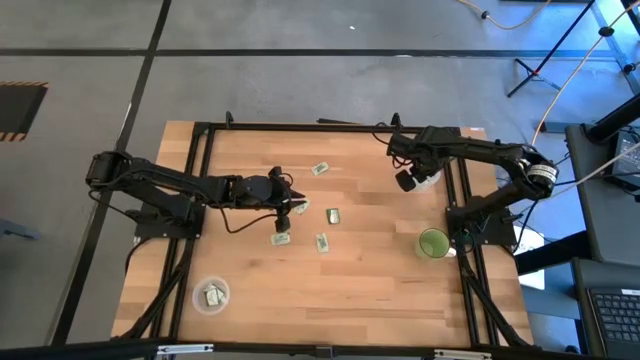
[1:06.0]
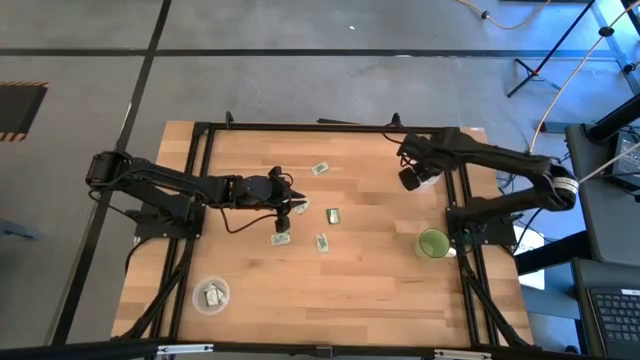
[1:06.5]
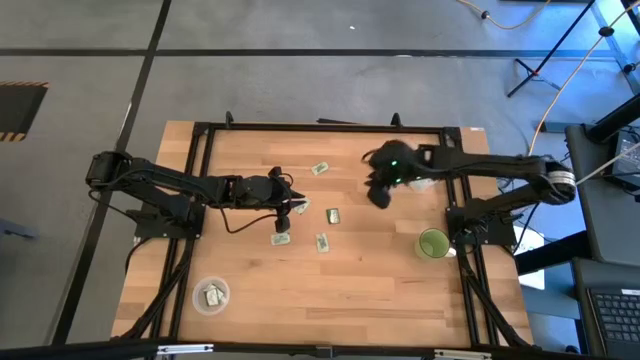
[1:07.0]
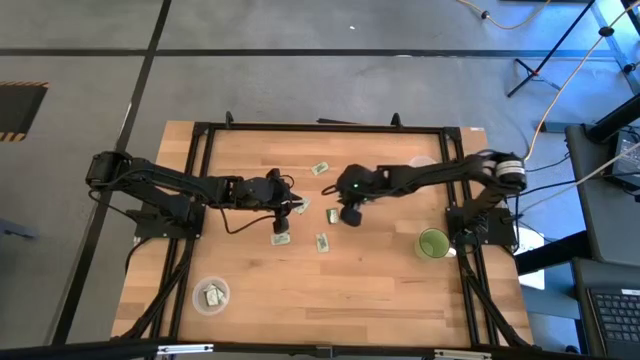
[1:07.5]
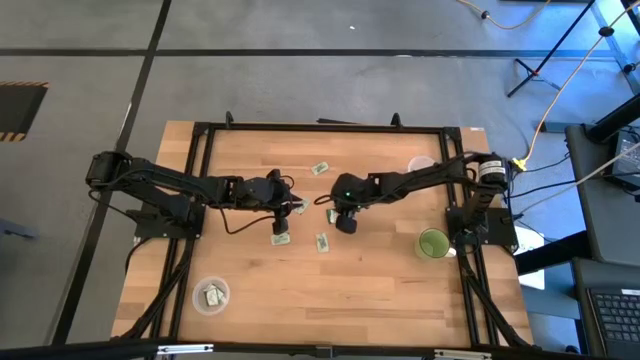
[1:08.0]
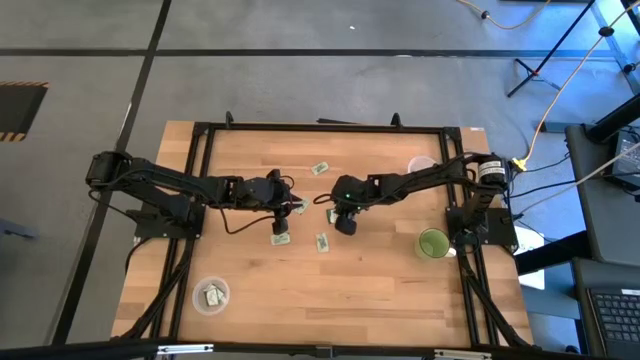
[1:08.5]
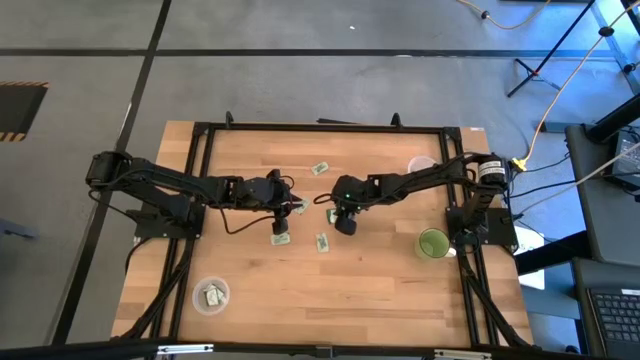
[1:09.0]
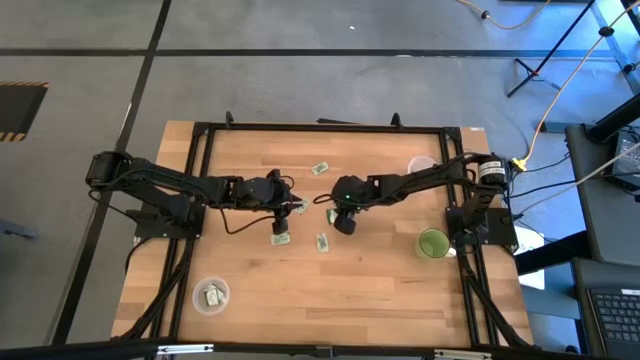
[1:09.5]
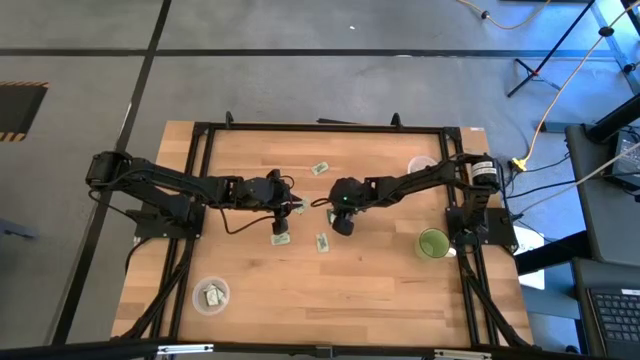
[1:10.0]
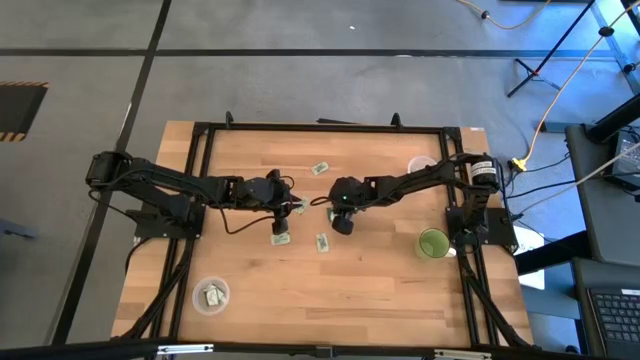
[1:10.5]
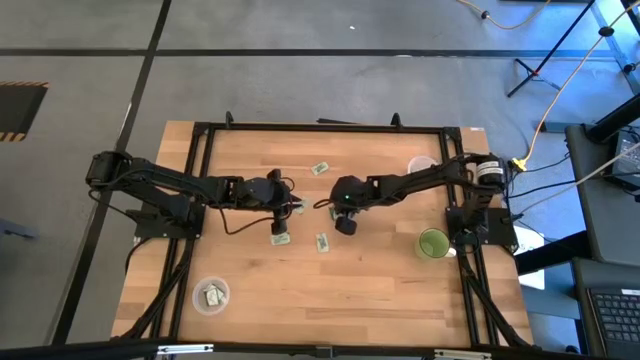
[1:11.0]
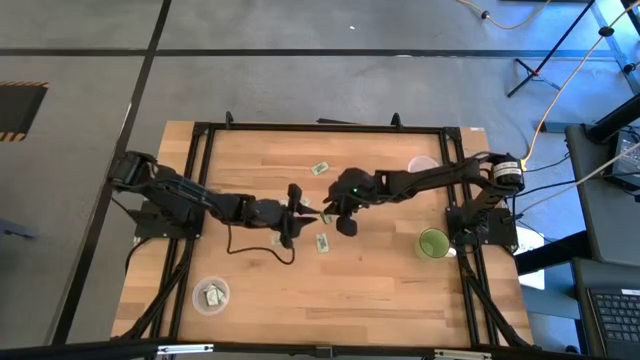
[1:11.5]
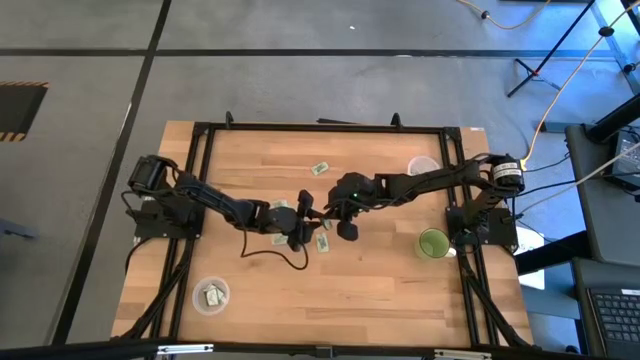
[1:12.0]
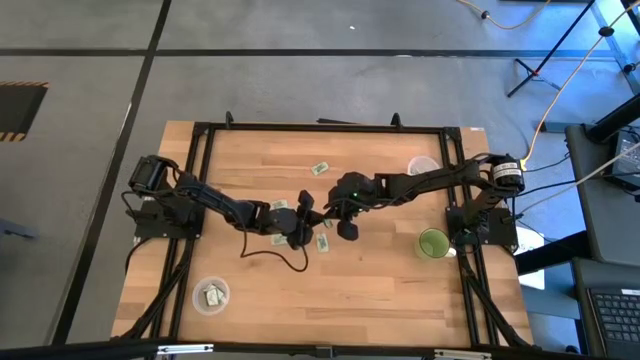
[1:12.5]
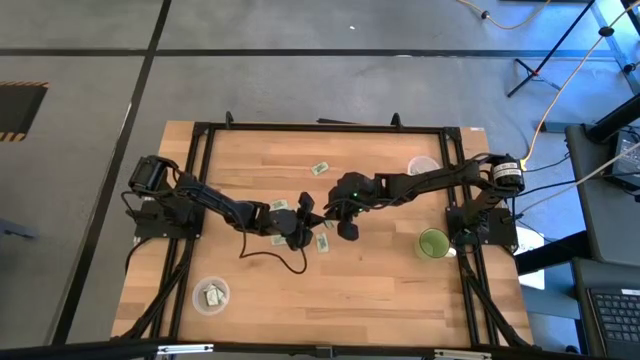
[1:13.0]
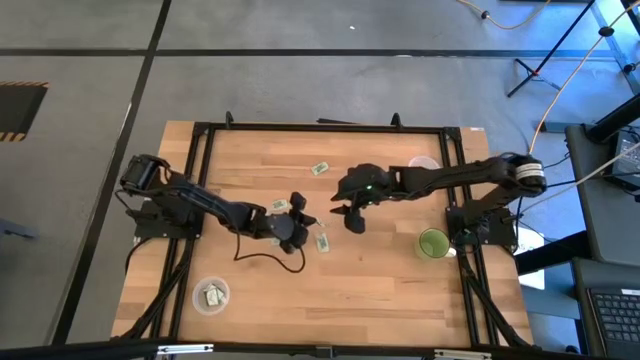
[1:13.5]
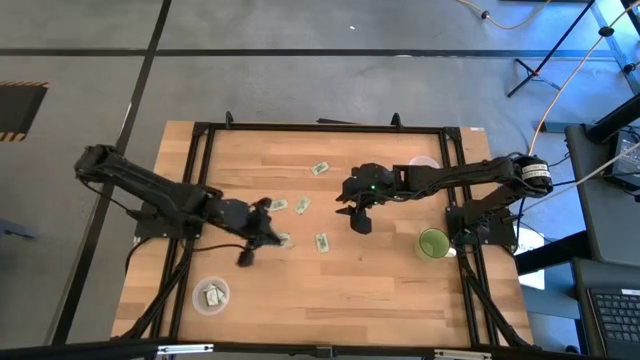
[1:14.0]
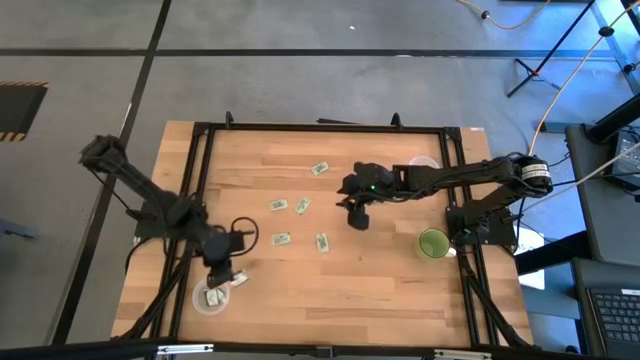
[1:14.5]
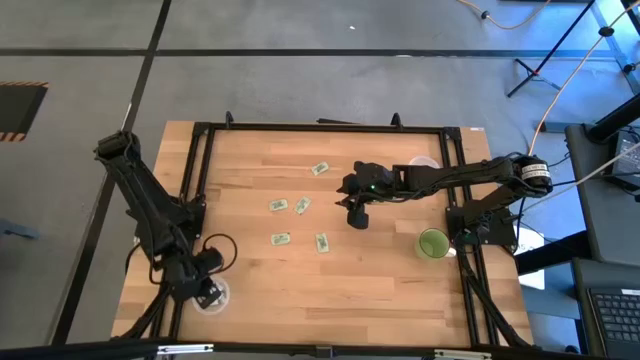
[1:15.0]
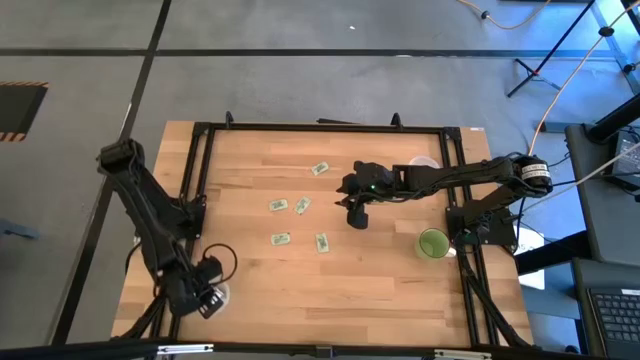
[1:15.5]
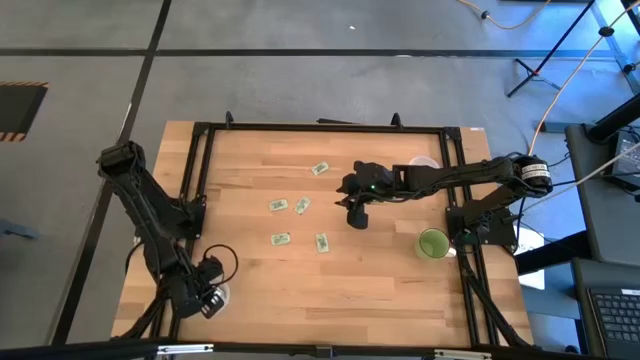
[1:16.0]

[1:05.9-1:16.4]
Task: Pick and place items into bin
Put the green stevia packet into the bottom white bin

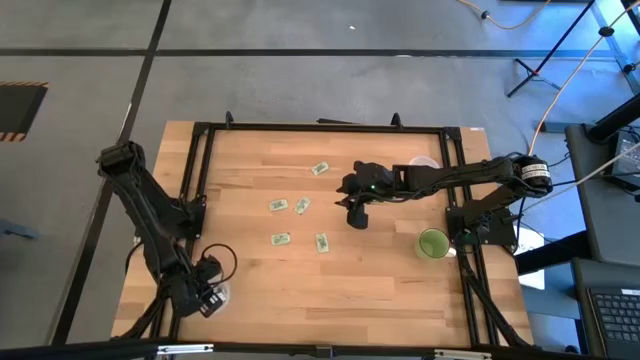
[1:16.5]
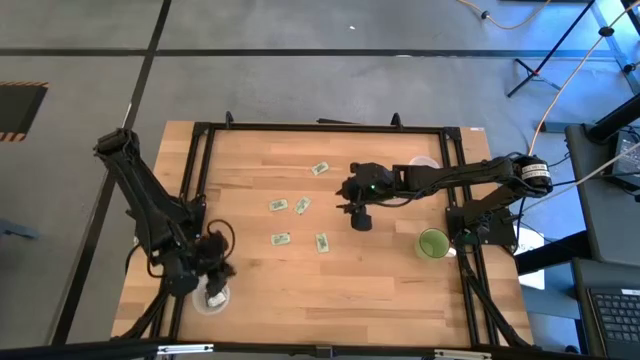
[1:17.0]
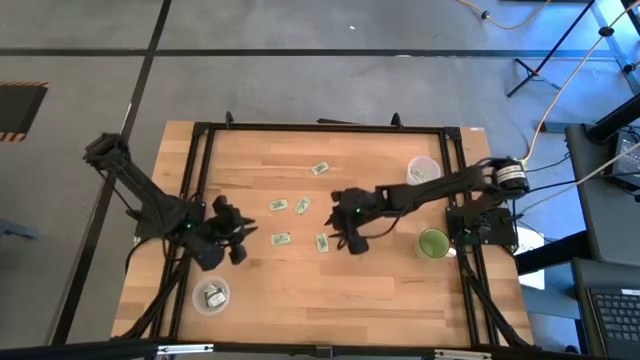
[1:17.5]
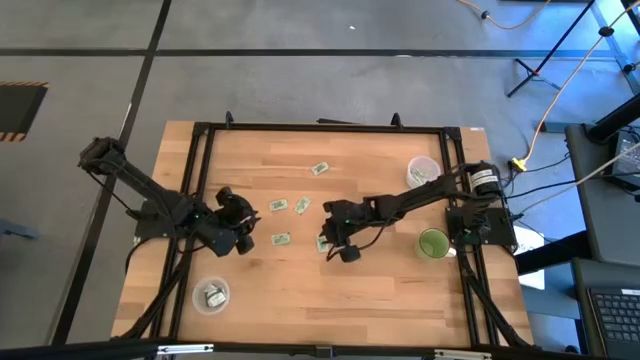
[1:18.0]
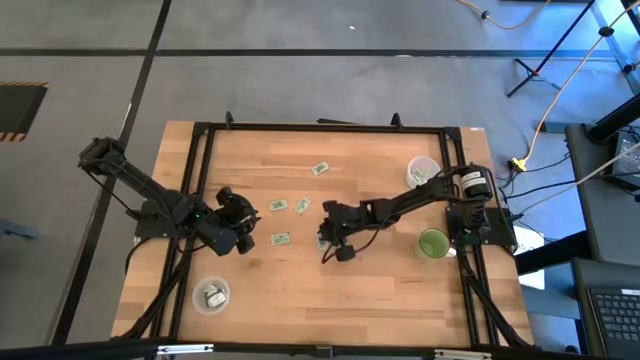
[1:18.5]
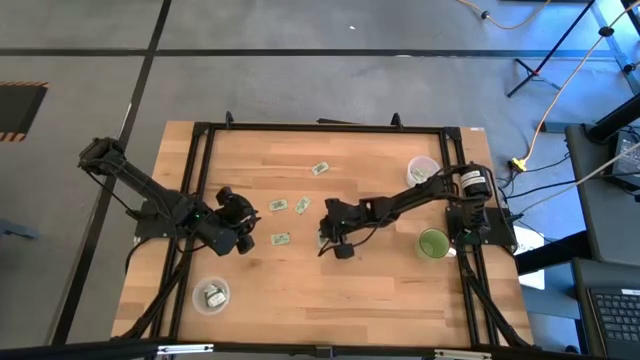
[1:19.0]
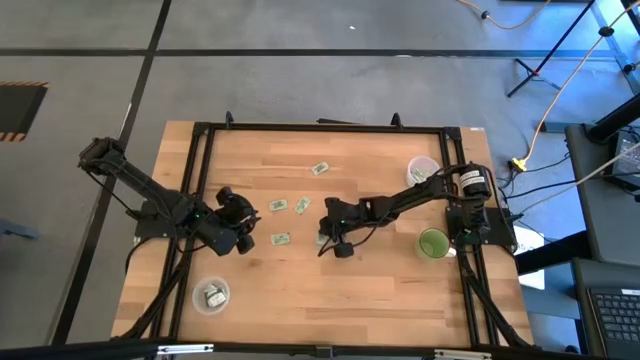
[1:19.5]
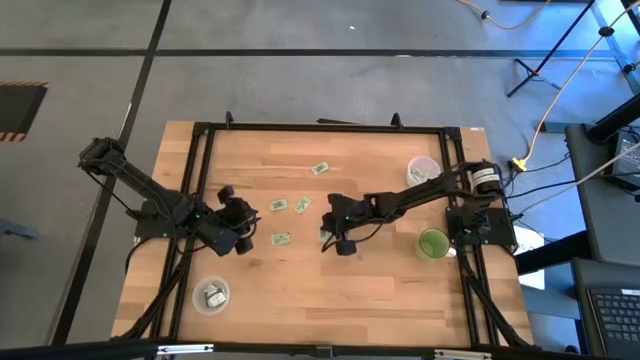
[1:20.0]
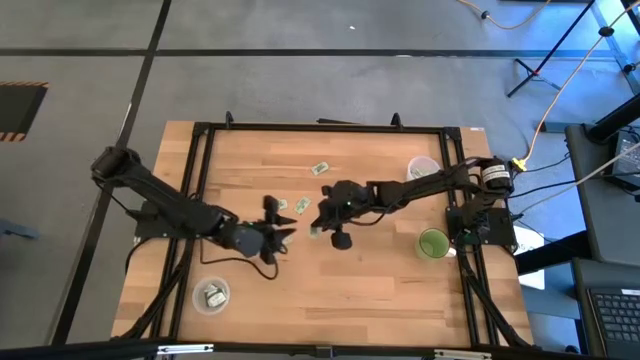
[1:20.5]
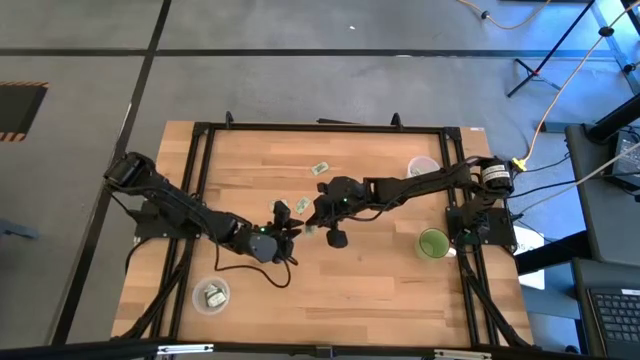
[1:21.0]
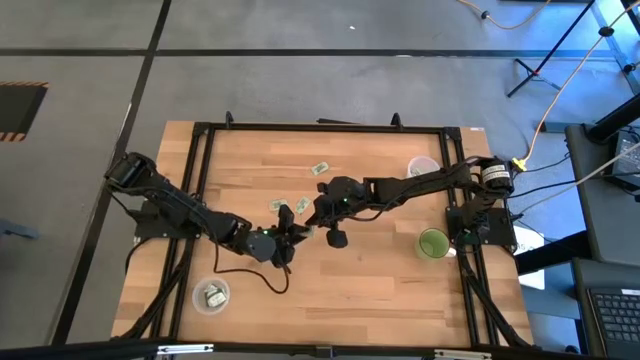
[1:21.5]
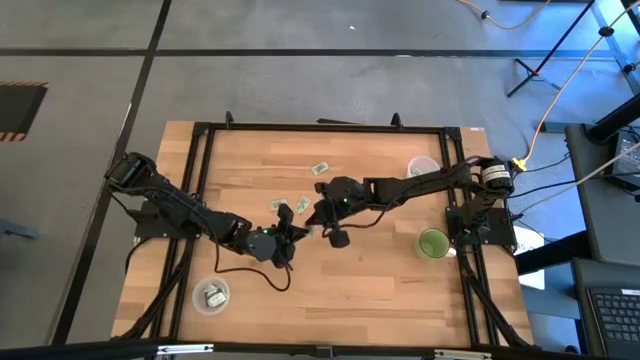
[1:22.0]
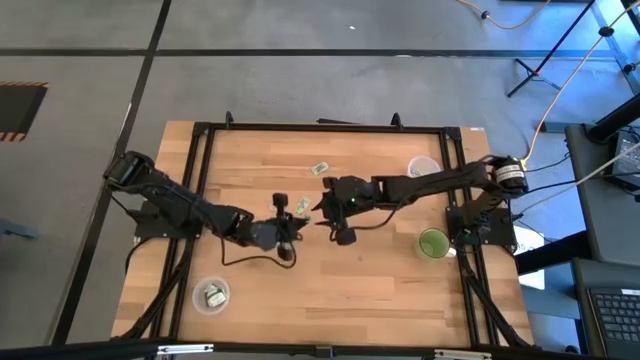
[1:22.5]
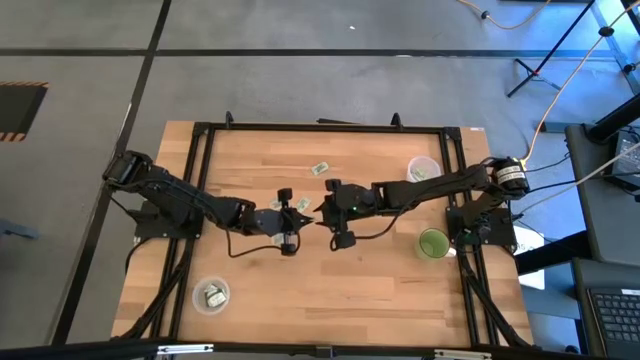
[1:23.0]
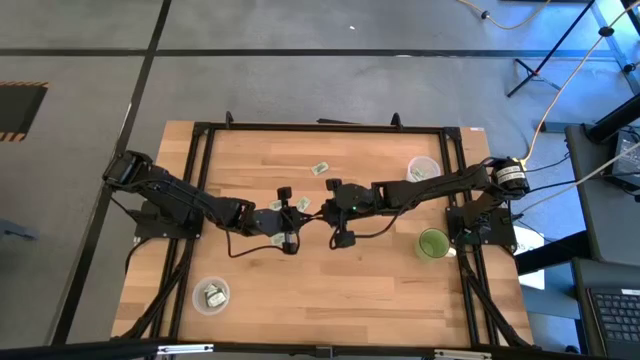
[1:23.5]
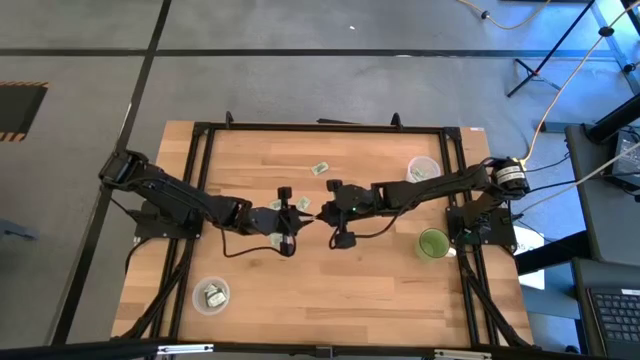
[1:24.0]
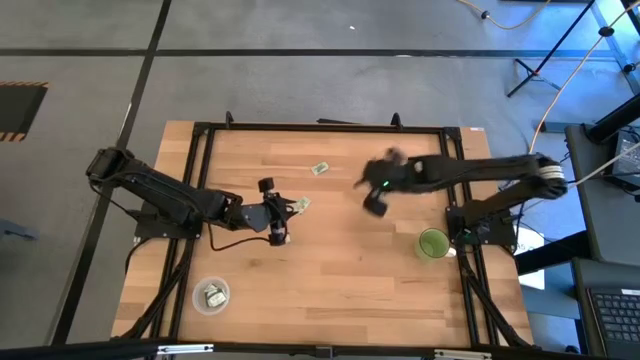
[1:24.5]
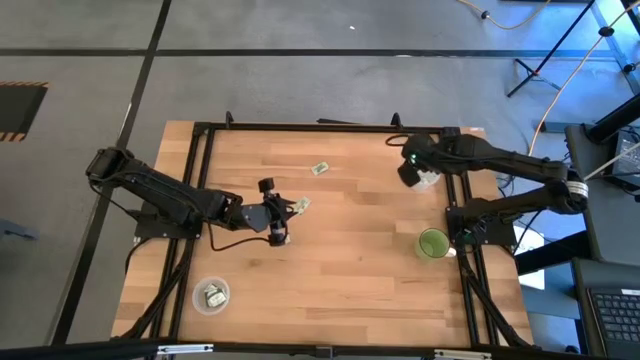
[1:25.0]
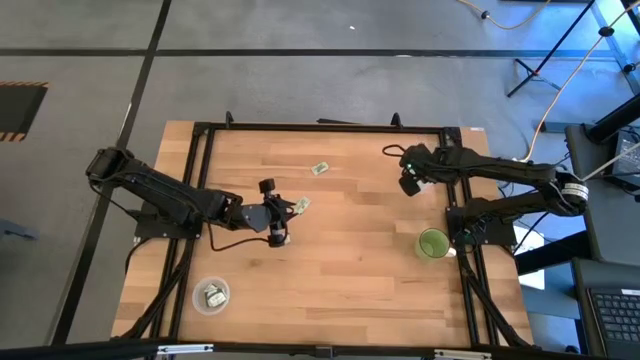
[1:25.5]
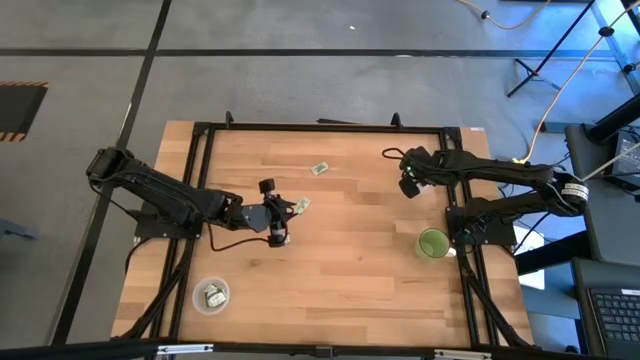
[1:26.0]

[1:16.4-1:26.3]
Put the white stevia packet into the top white bin

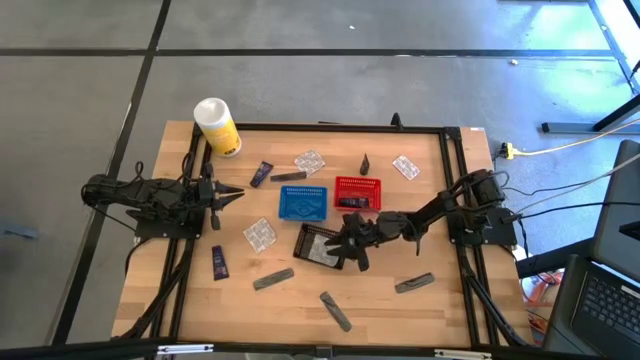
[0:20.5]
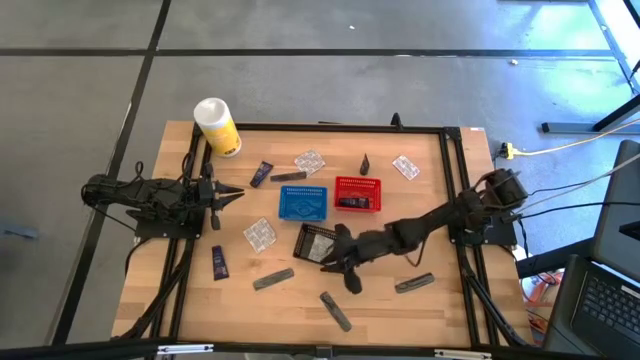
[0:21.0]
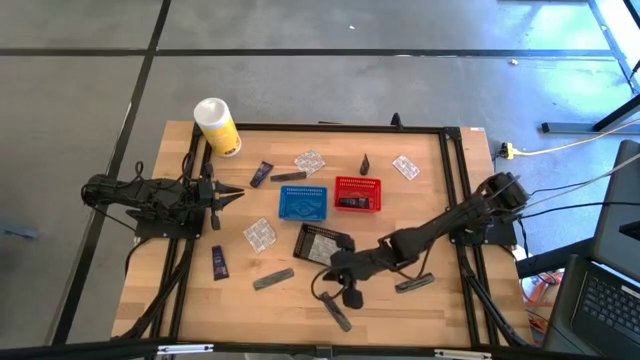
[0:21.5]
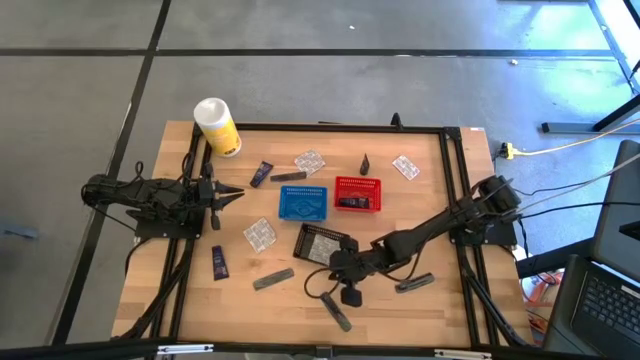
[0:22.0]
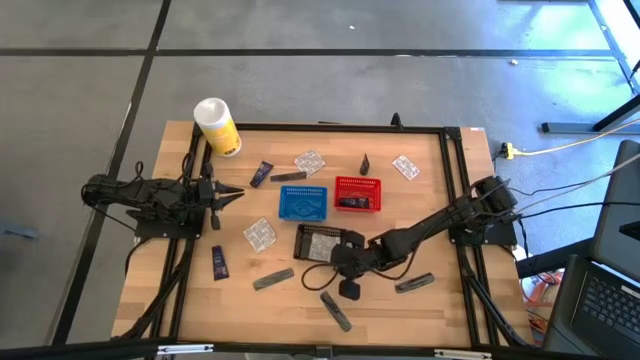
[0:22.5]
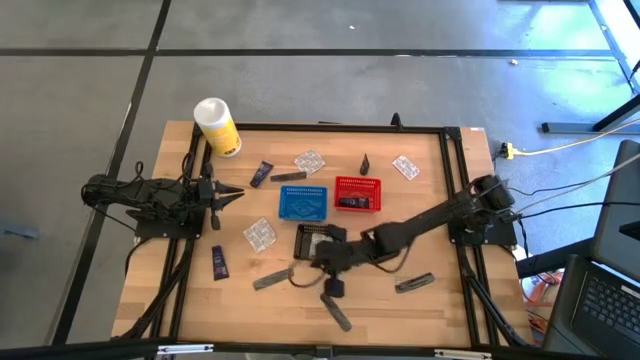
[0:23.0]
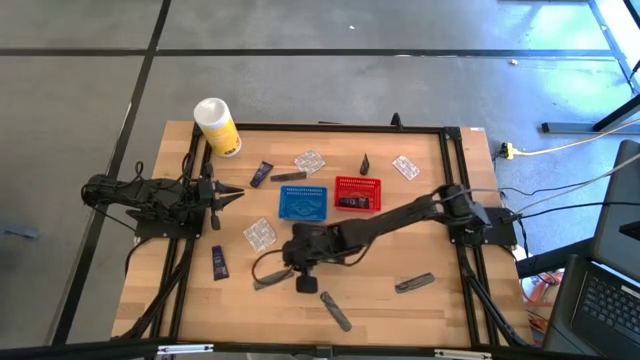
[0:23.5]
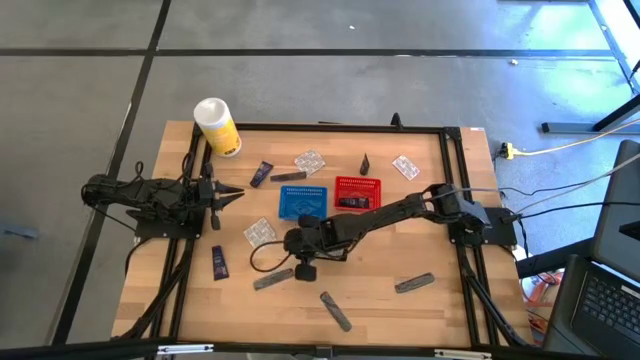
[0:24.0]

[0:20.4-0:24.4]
Task: Pick & Place Travel size toiletries
Adjust the black bin
